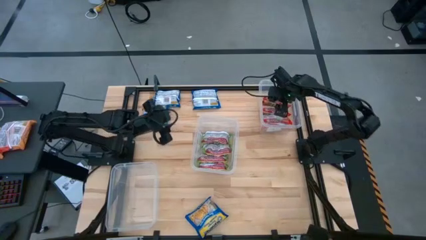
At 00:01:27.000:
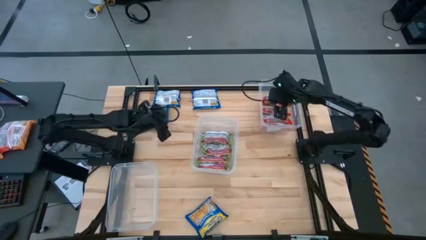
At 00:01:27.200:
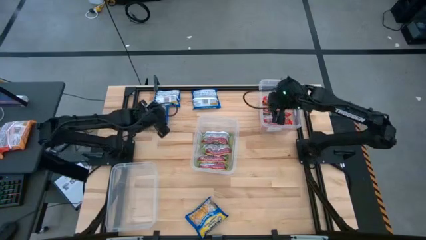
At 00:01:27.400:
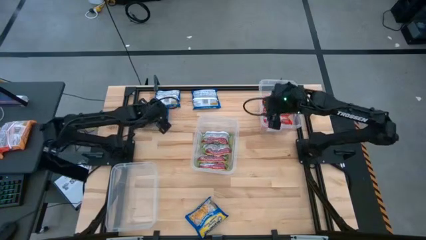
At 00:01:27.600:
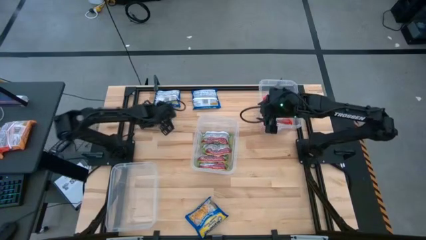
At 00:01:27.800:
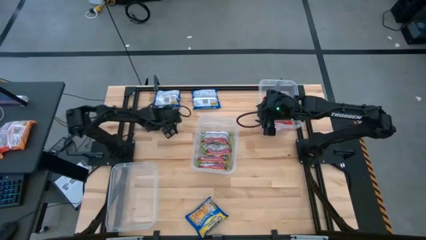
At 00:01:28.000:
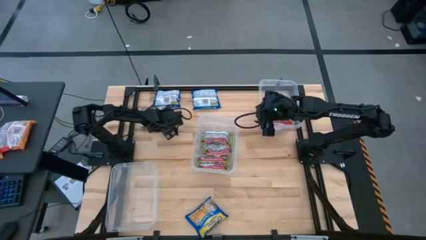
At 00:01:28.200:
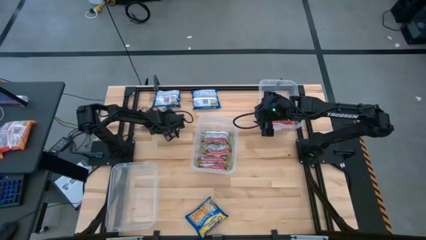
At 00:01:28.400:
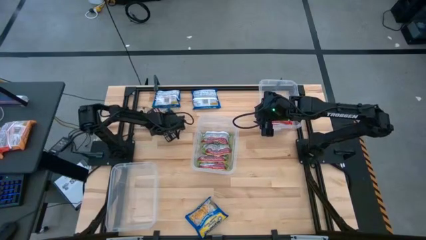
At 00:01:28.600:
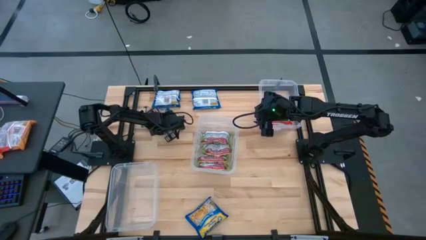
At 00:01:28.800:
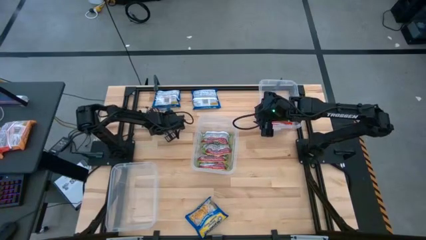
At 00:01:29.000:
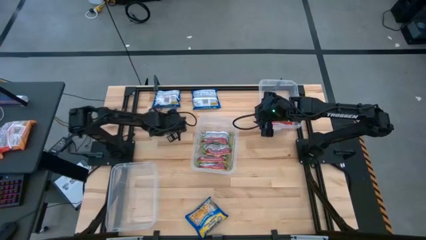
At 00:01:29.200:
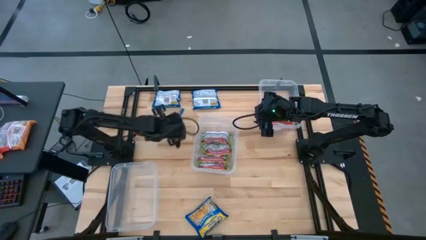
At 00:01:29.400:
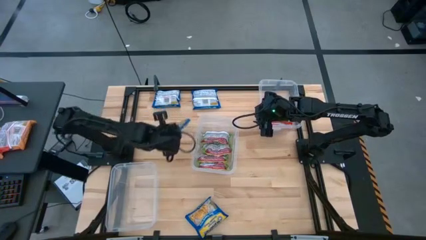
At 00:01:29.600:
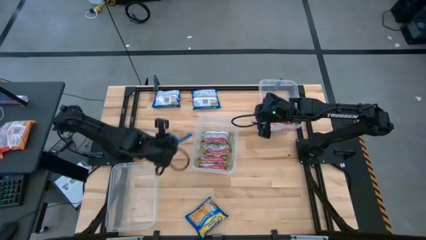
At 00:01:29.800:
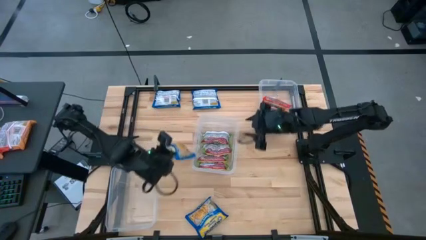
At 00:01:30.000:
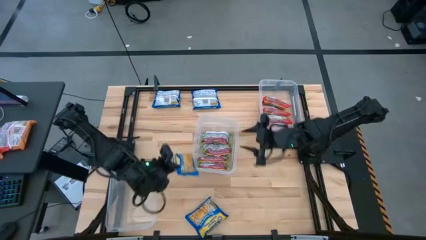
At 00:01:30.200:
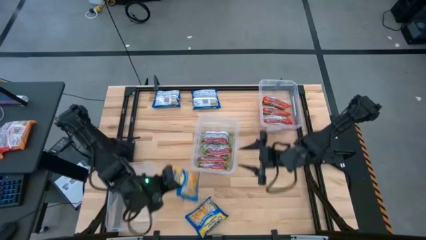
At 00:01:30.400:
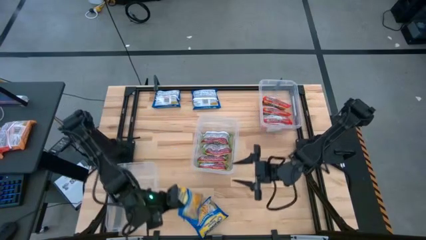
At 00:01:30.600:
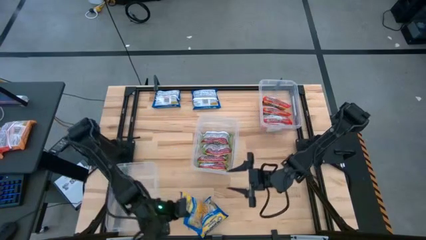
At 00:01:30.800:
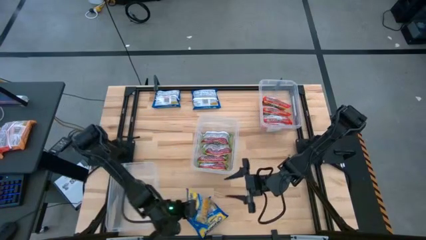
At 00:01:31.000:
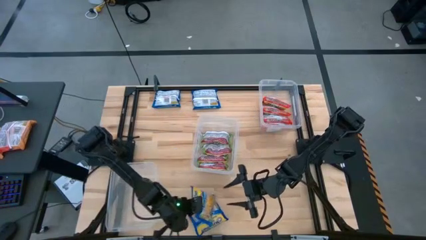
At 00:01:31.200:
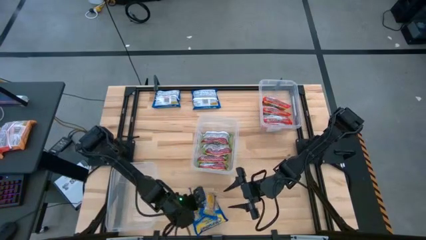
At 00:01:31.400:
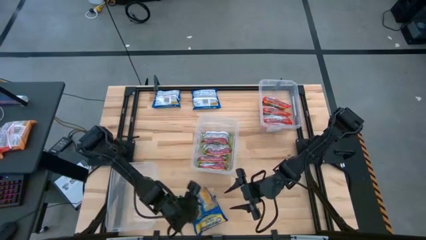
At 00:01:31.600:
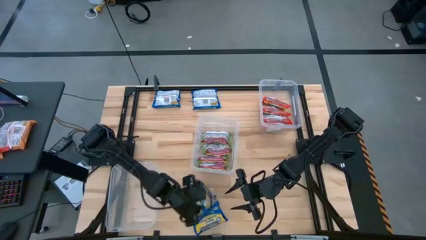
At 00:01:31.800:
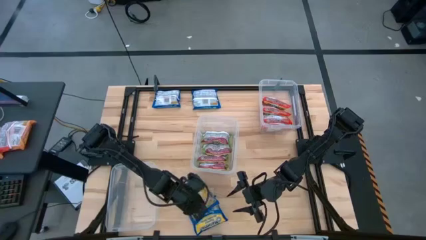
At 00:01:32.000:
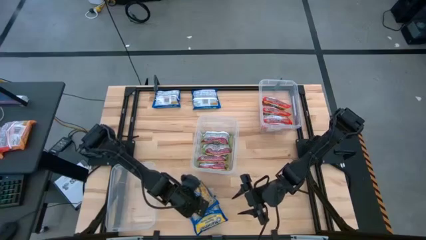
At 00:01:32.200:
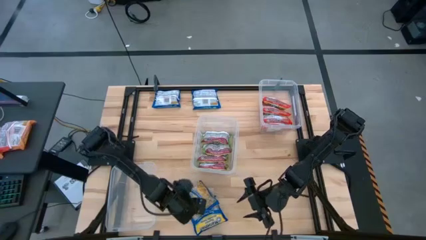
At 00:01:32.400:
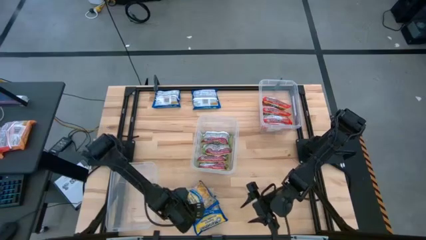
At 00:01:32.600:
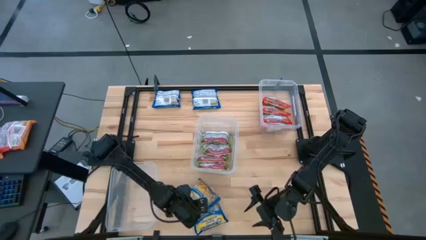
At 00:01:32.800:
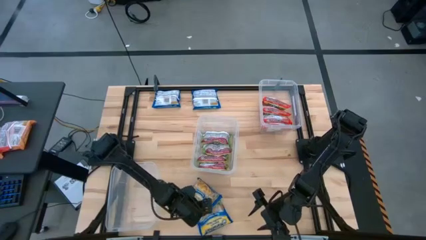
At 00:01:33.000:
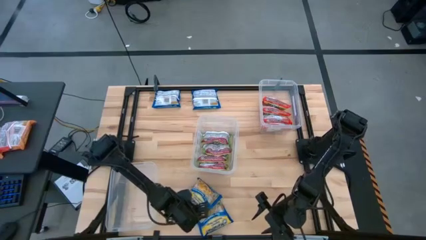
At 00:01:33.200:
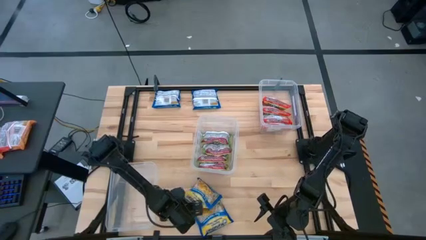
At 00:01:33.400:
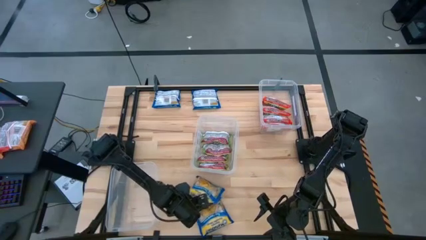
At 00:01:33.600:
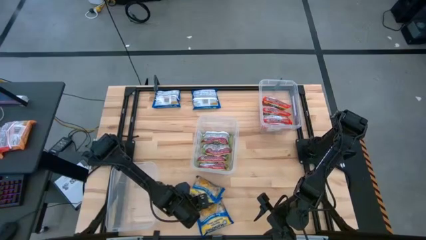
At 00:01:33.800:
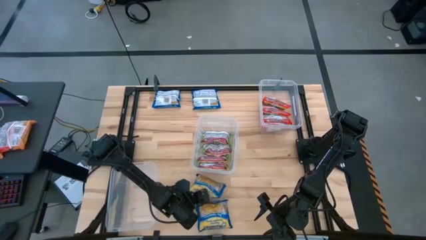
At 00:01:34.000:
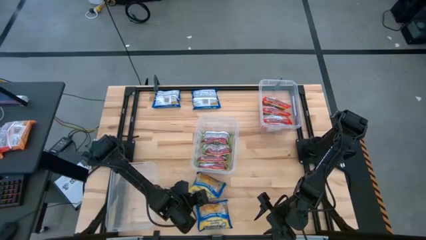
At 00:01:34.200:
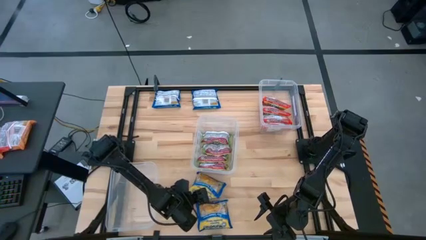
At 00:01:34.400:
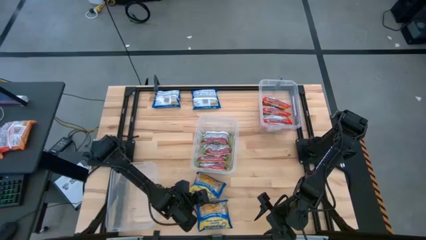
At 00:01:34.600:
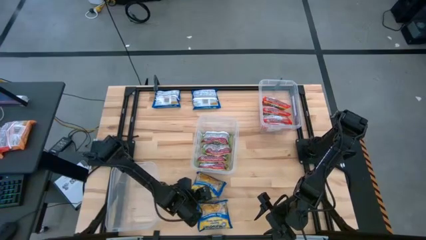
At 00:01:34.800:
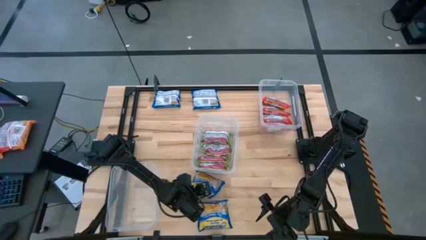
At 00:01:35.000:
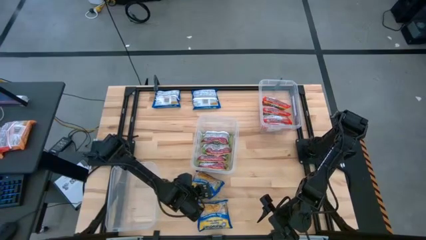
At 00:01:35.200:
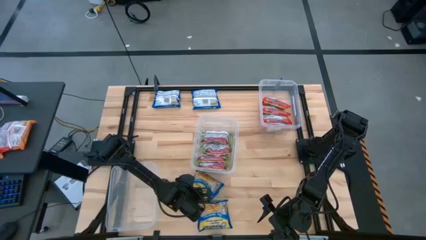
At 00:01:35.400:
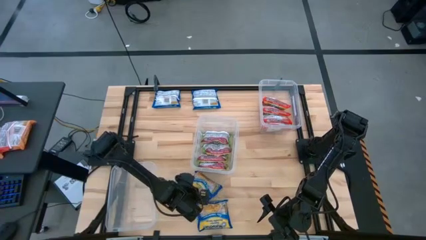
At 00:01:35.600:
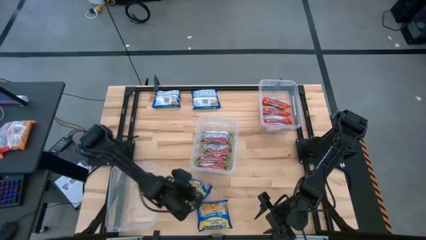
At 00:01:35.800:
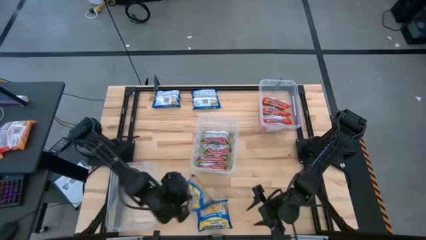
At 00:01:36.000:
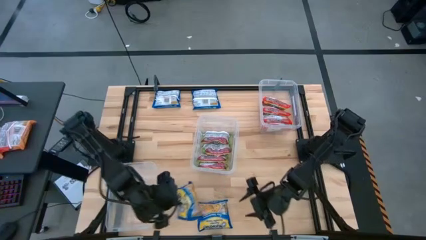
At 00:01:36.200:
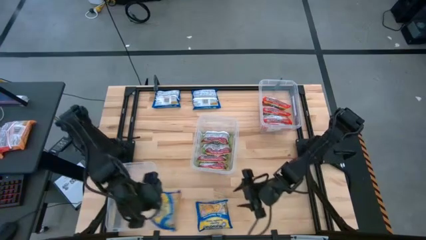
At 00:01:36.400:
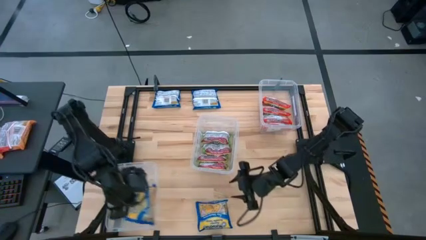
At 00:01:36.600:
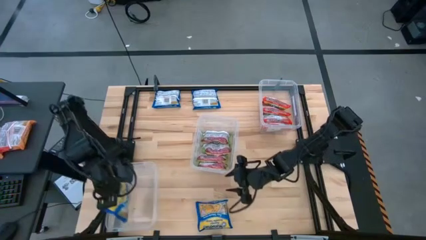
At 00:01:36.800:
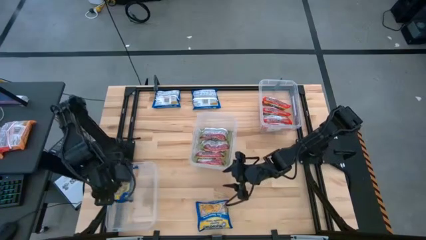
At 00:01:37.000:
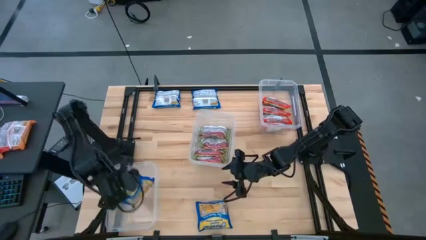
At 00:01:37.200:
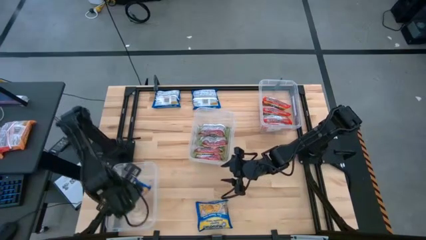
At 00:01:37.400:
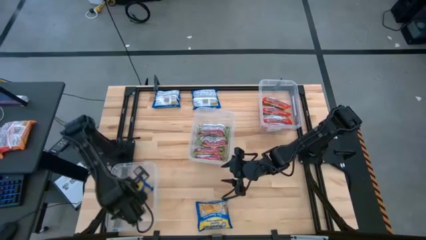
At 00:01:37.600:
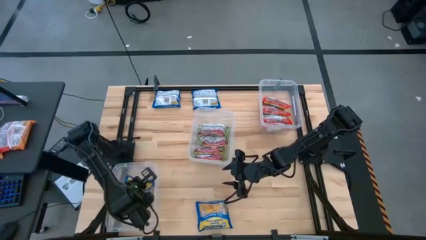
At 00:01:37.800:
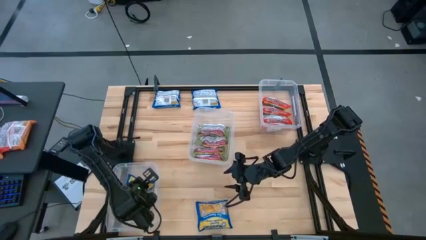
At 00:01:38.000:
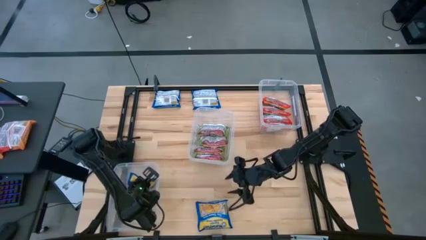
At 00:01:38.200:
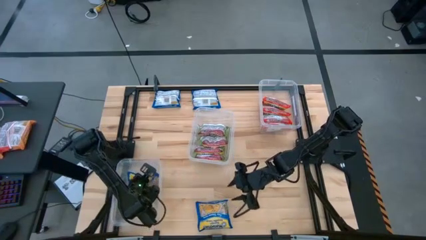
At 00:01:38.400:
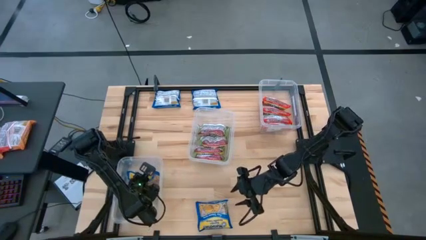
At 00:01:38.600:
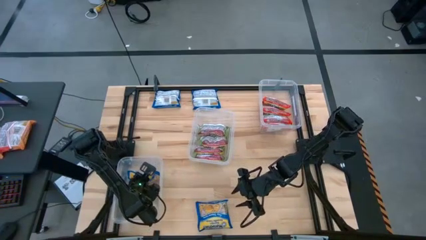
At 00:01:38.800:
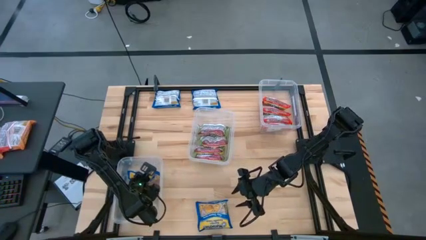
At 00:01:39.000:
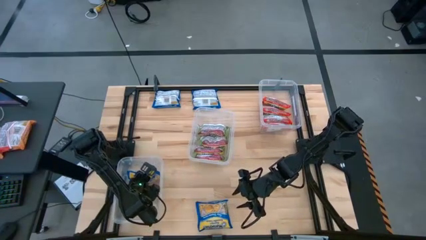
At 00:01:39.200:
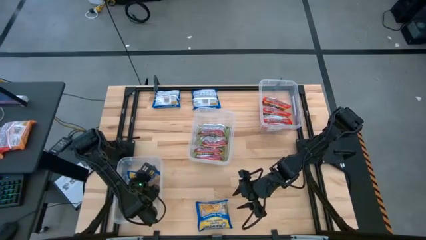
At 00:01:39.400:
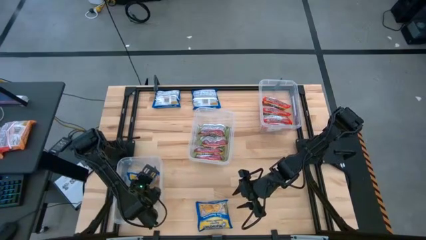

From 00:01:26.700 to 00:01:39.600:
Task: Sort Maruchan noodles
Put the blue noodle pack into the bottom transparent container
